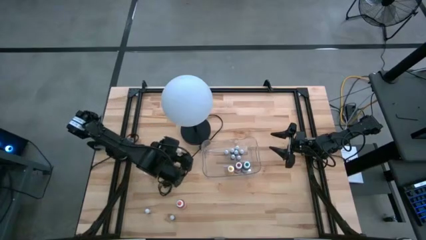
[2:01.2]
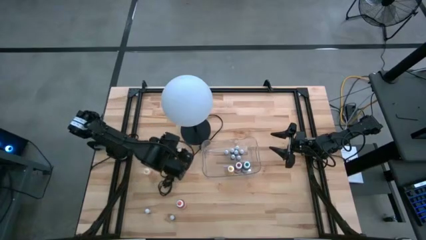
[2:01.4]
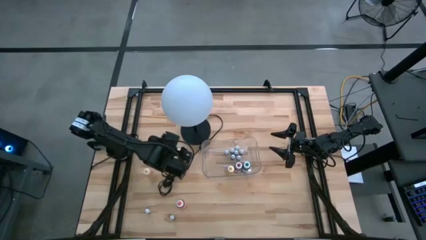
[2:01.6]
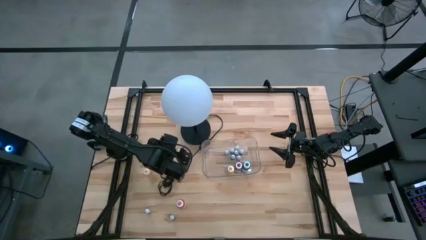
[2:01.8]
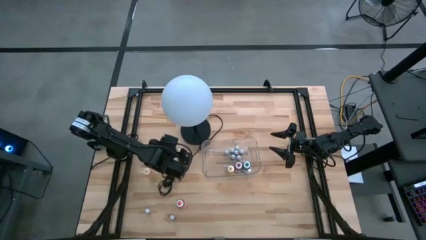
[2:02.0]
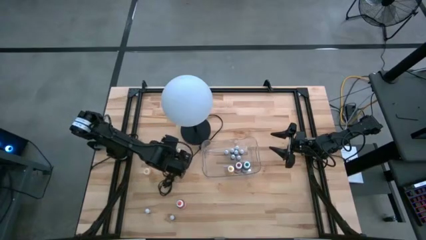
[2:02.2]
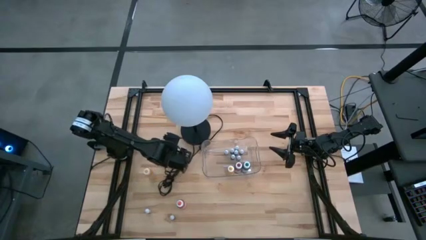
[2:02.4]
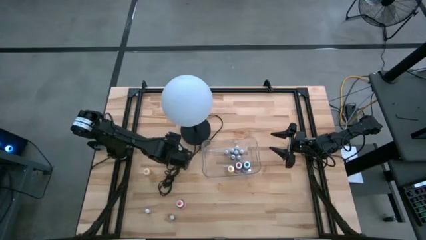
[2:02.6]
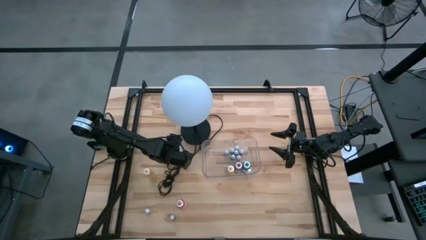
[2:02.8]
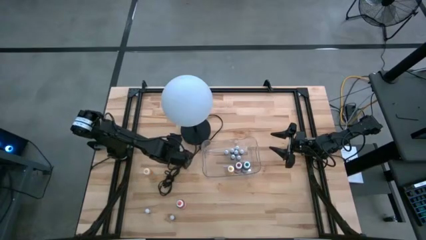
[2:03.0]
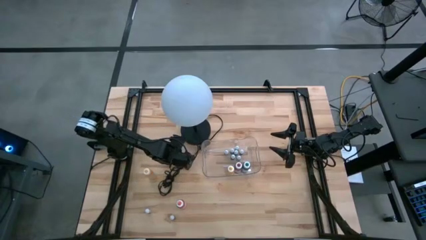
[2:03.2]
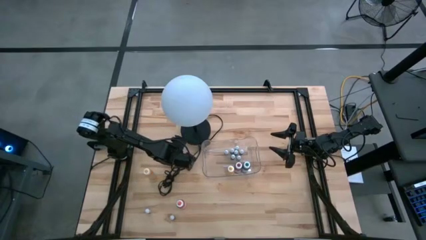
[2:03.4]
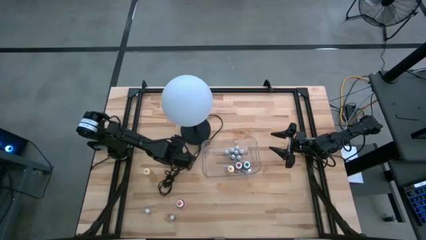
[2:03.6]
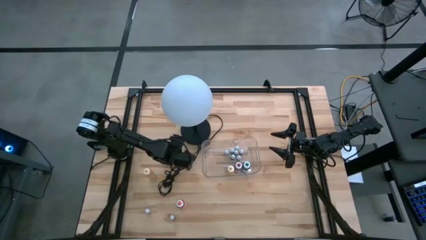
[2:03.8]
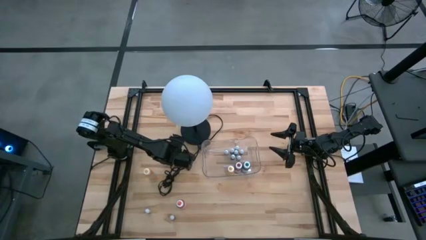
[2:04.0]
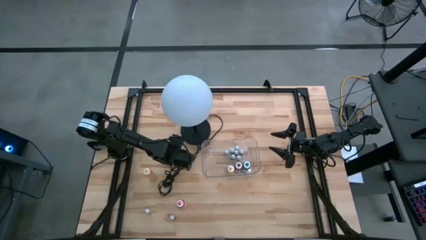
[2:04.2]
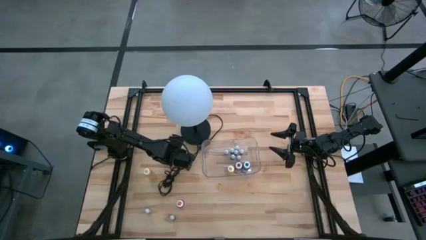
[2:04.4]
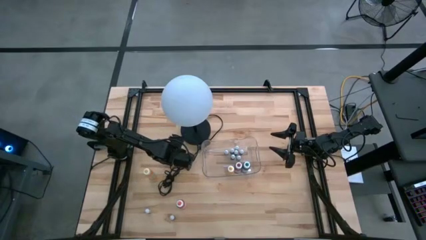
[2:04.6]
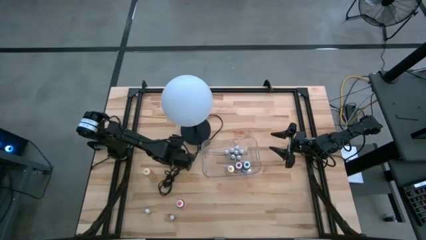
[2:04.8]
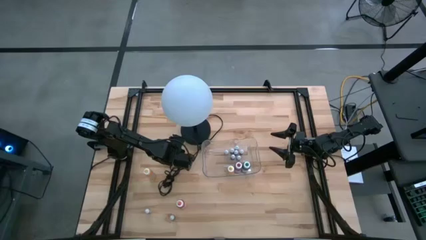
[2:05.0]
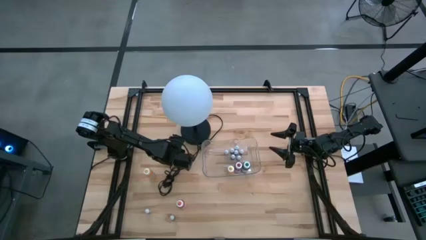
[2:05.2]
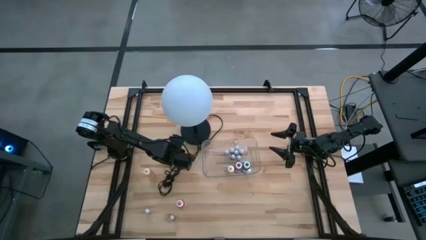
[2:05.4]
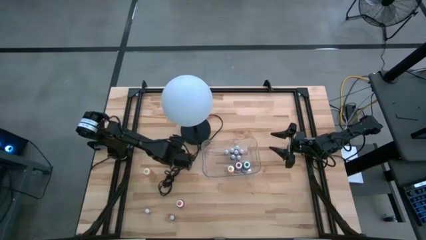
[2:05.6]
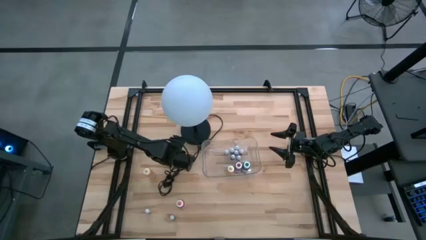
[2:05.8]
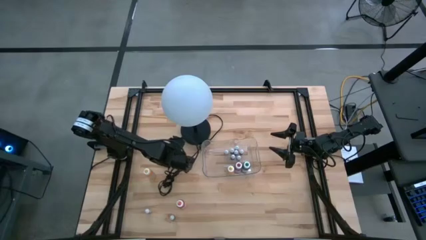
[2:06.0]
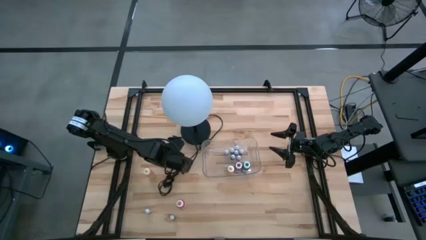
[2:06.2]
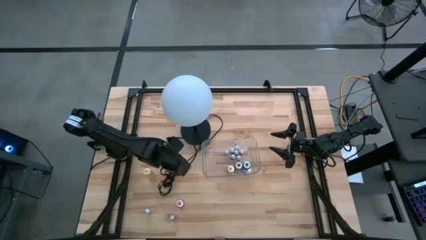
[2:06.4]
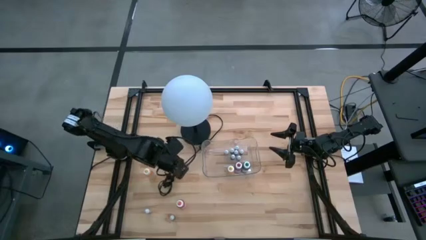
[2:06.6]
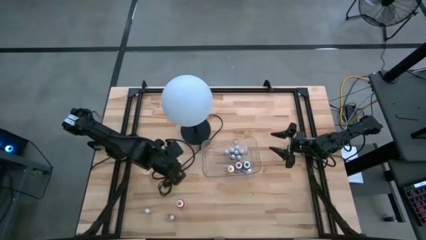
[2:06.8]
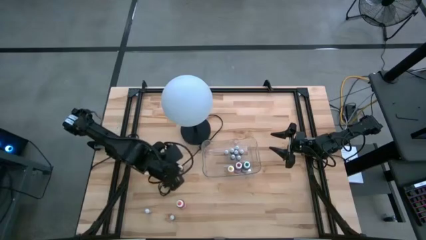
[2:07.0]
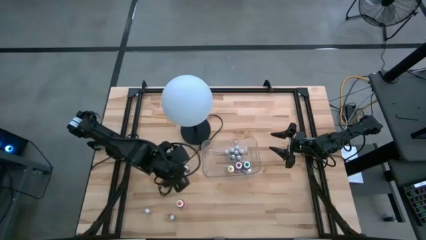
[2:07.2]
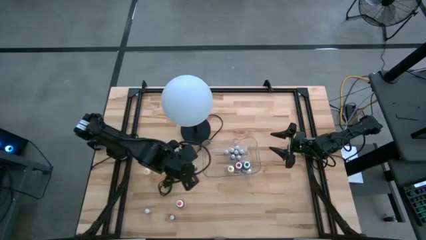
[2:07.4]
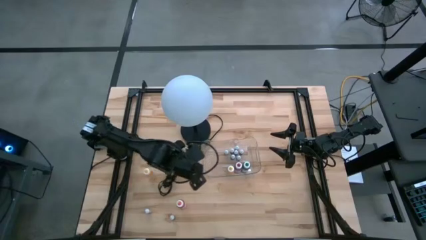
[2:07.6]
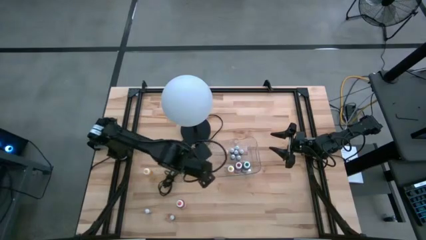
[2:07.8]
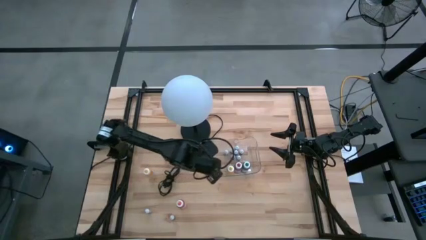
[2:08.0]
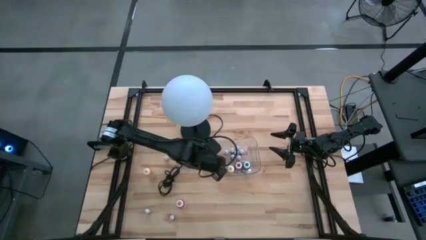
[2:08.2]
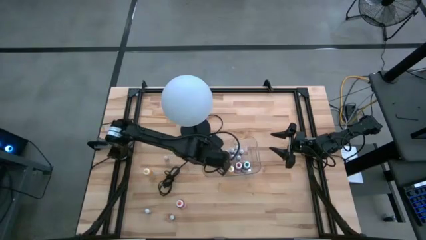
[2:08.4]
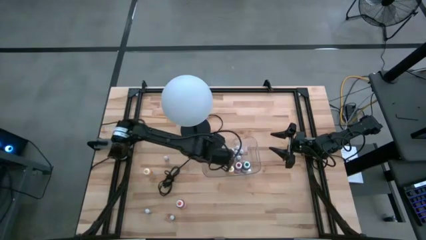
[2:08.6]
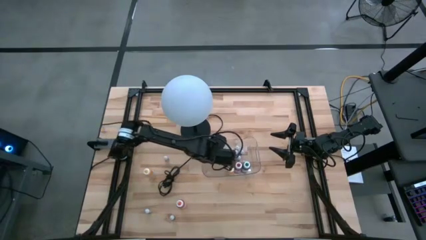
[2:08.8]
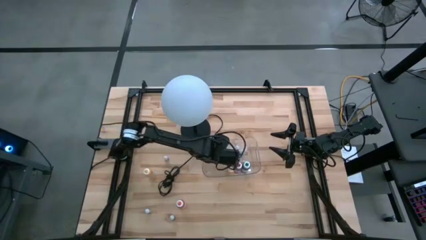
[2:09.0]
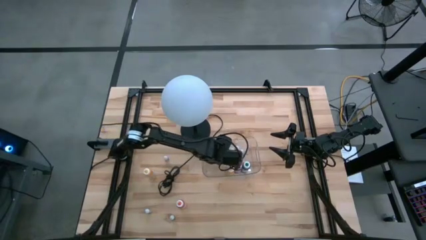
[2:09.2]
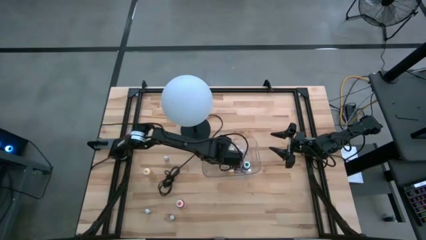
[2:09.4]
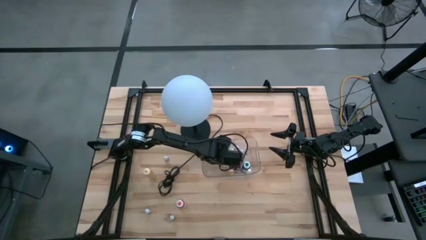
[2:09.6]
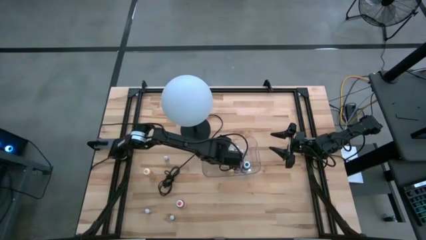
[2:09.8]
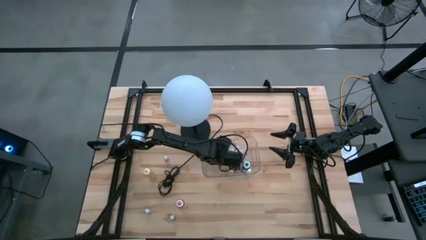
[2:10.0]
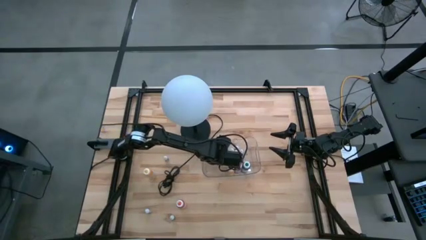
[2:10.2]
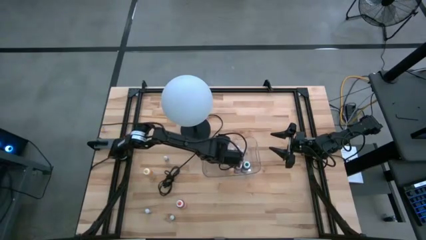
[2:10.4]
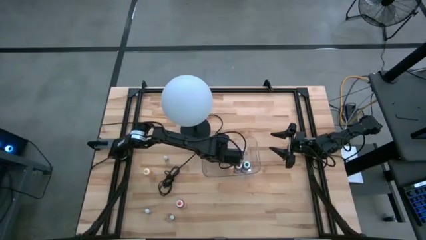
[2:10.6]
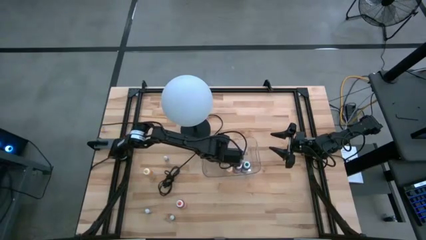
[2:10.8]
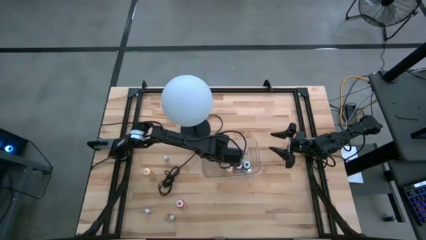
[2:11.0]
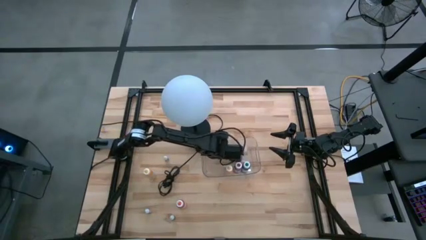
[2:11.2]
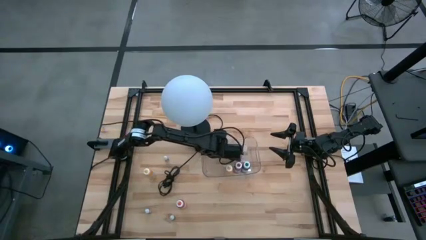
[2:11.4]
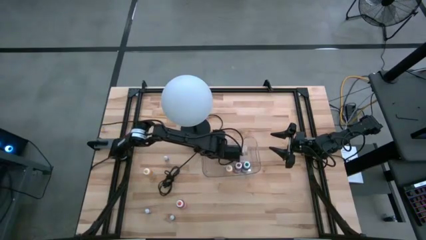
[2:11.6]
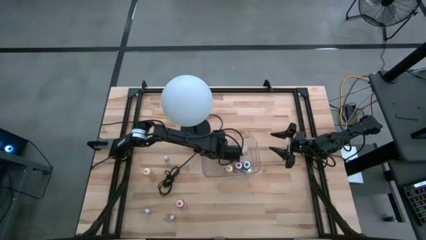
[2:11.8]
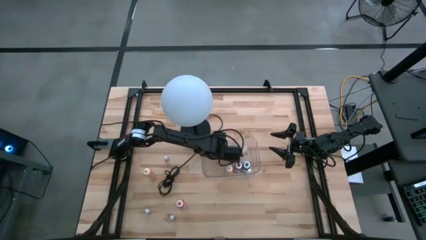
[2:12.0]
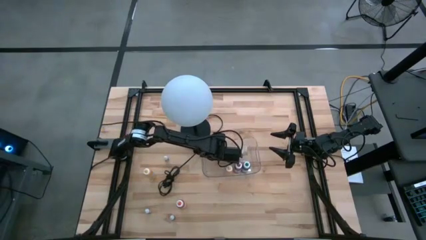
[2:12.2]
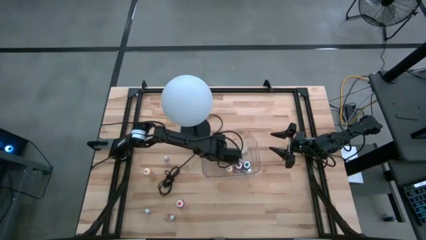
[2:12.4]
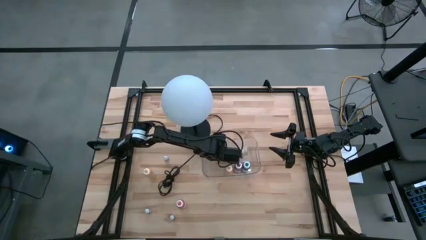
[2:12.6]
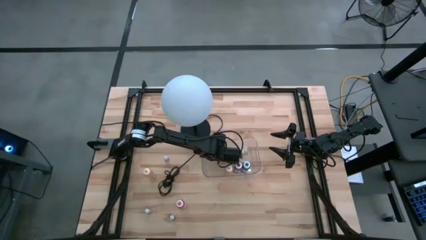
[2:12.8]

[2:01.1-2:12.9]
Task: Pick & Place food coloring
Put the small blue food coloring bottle into the transparent bin
